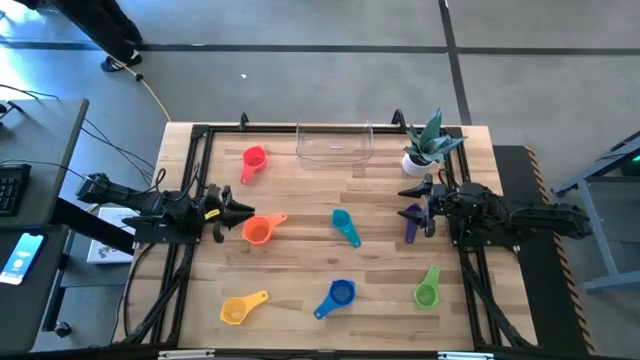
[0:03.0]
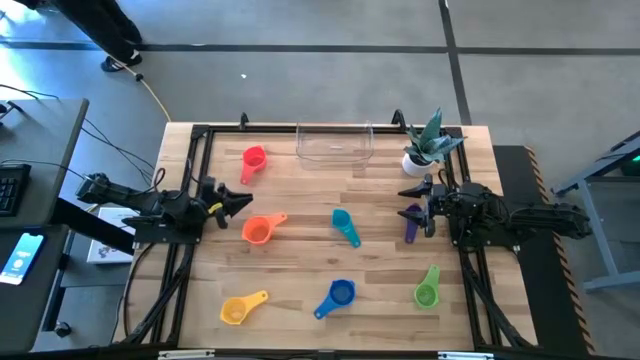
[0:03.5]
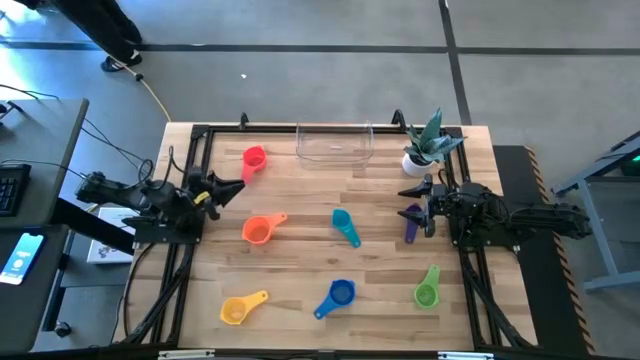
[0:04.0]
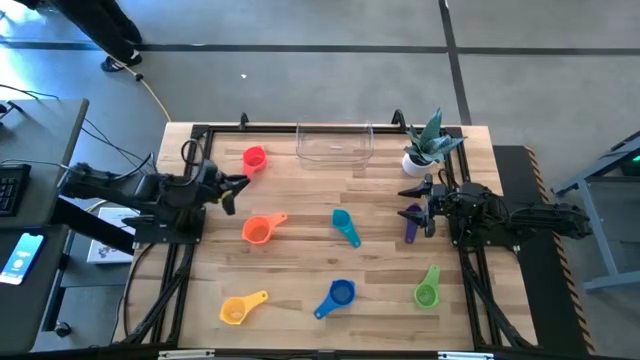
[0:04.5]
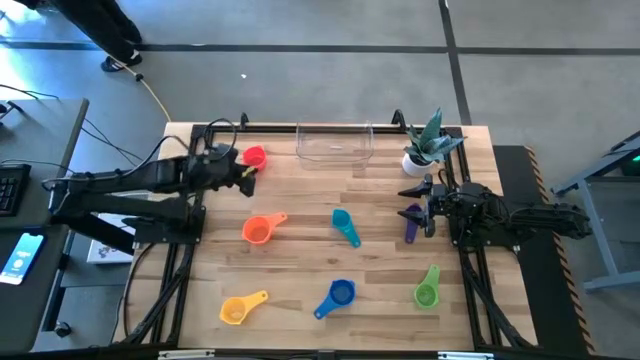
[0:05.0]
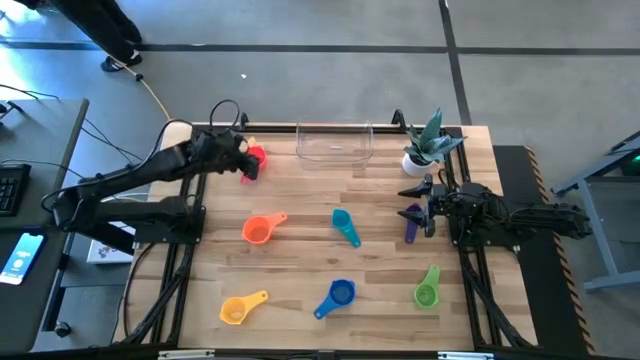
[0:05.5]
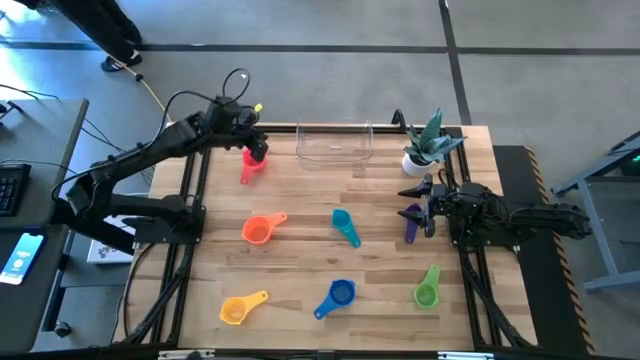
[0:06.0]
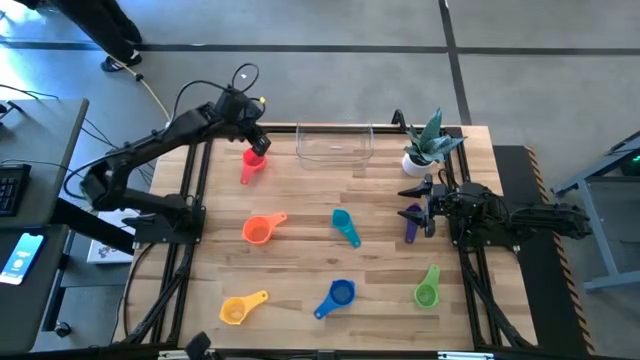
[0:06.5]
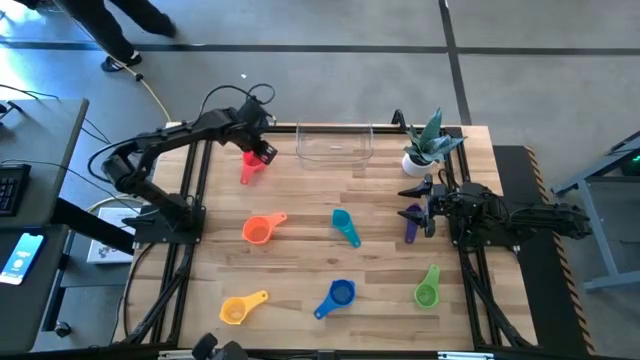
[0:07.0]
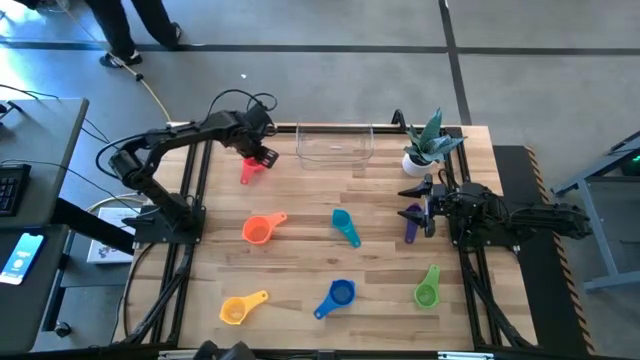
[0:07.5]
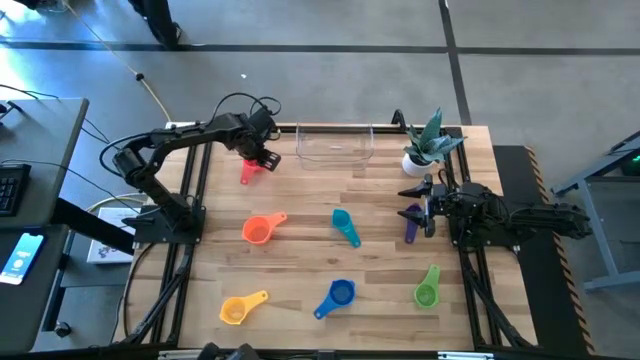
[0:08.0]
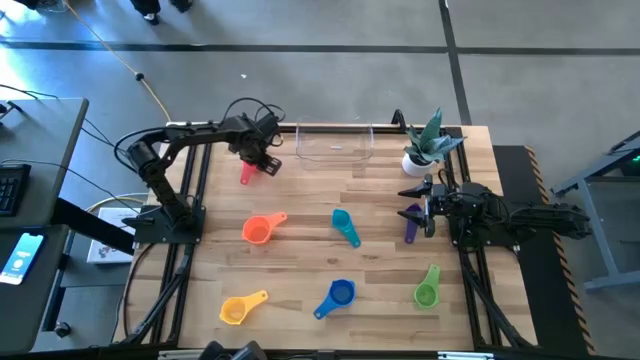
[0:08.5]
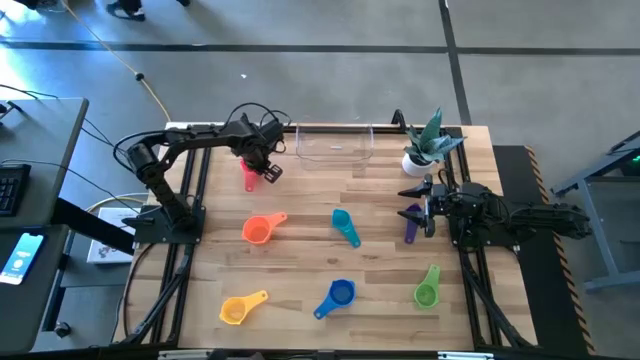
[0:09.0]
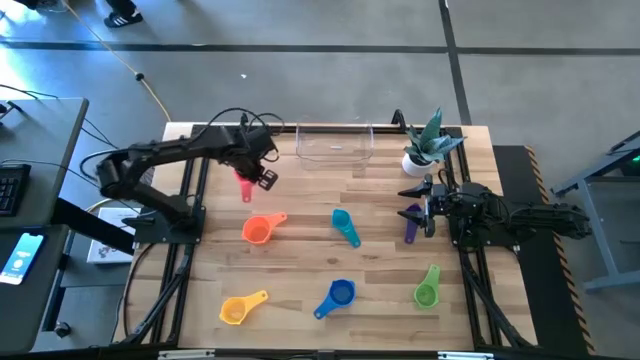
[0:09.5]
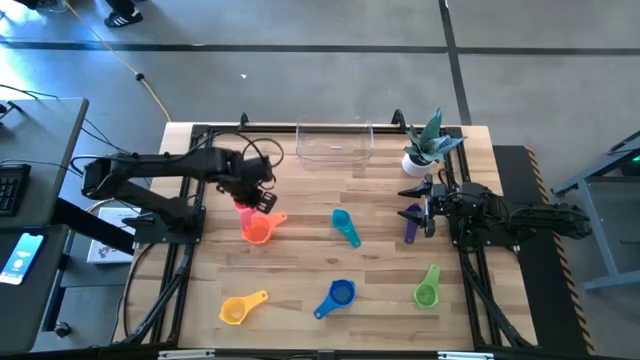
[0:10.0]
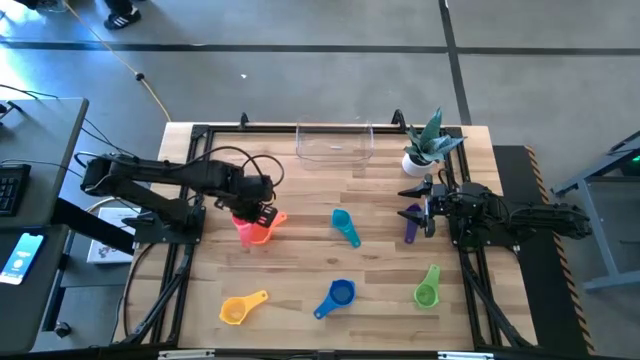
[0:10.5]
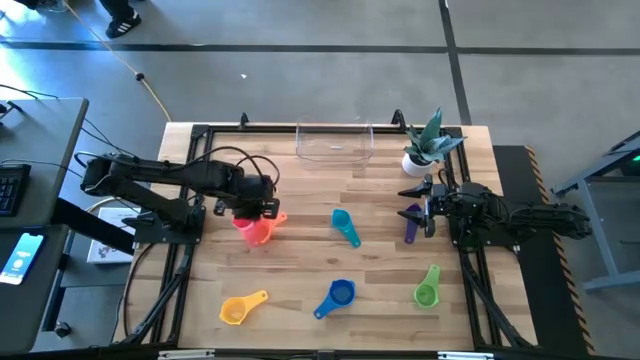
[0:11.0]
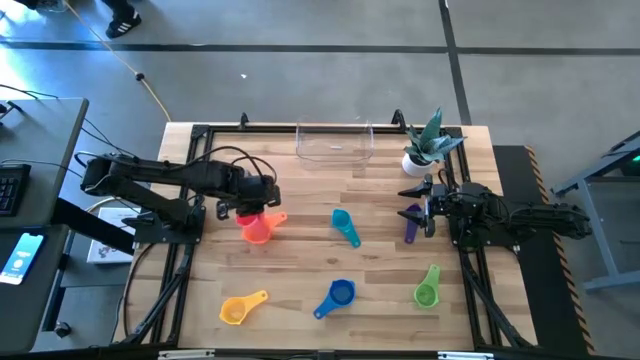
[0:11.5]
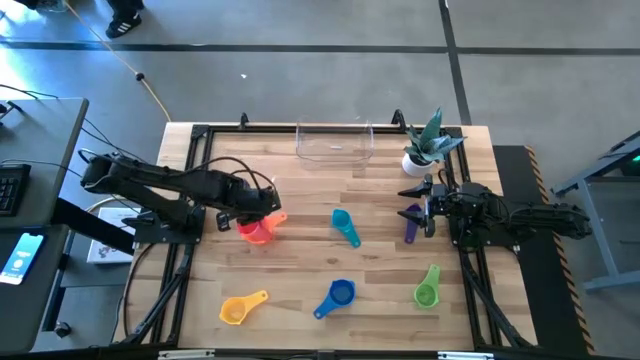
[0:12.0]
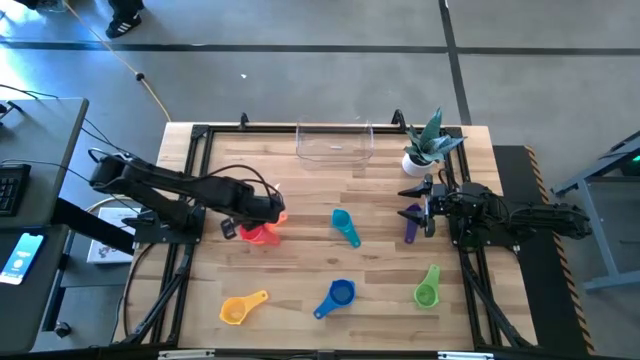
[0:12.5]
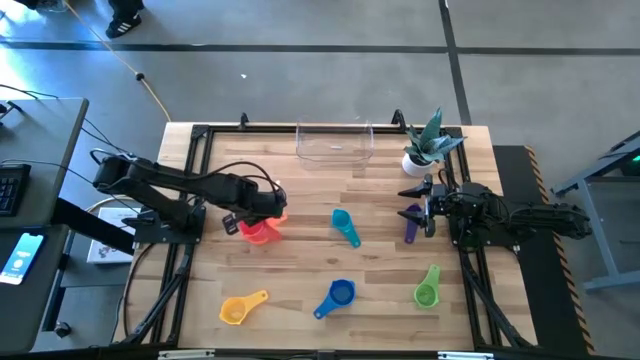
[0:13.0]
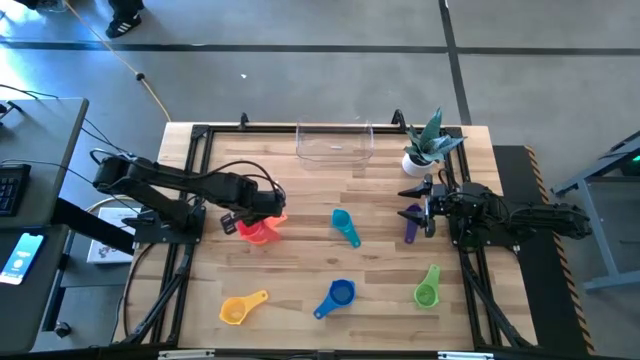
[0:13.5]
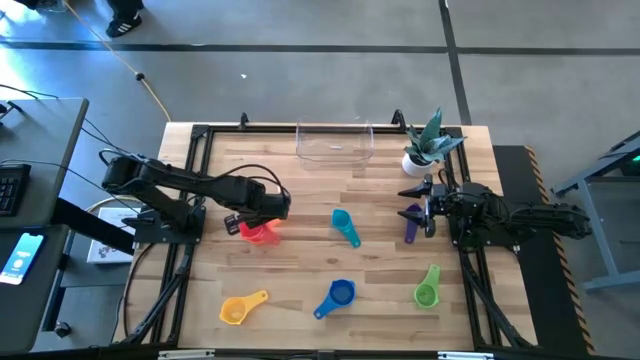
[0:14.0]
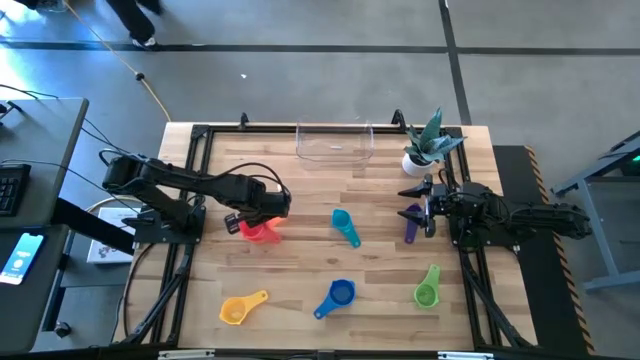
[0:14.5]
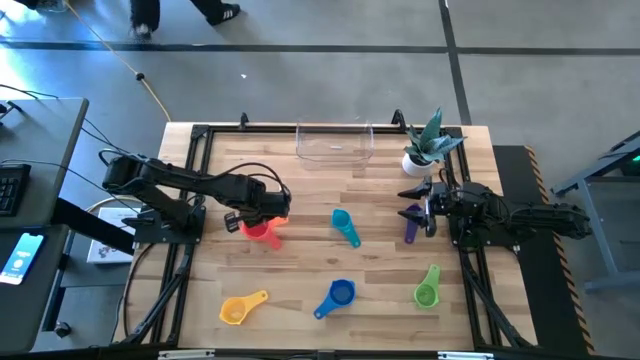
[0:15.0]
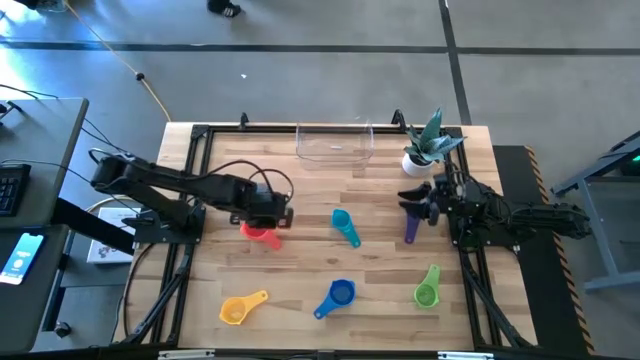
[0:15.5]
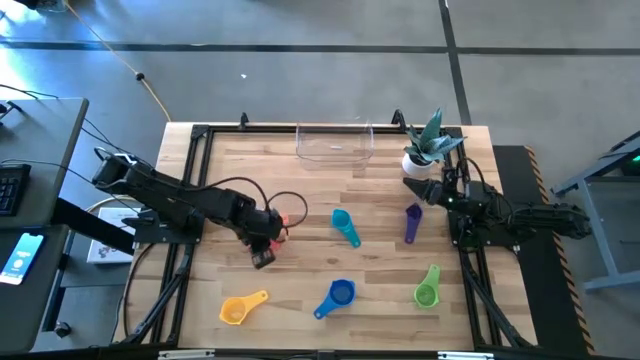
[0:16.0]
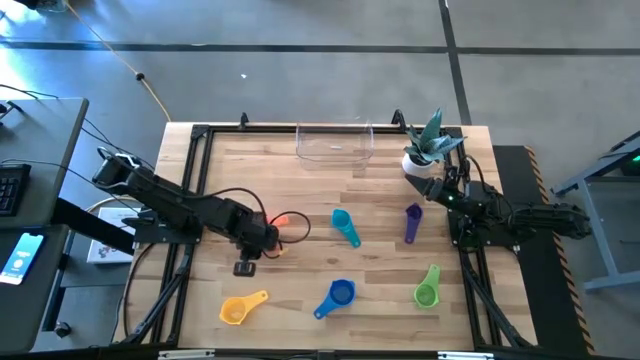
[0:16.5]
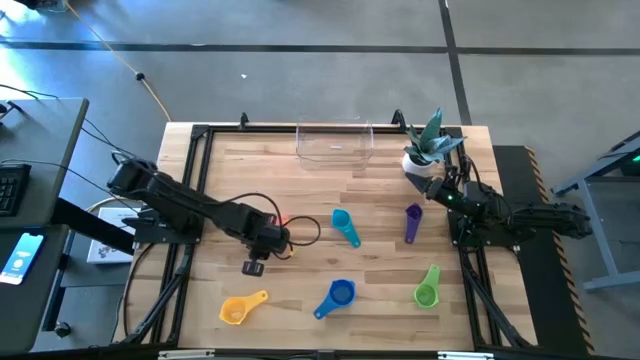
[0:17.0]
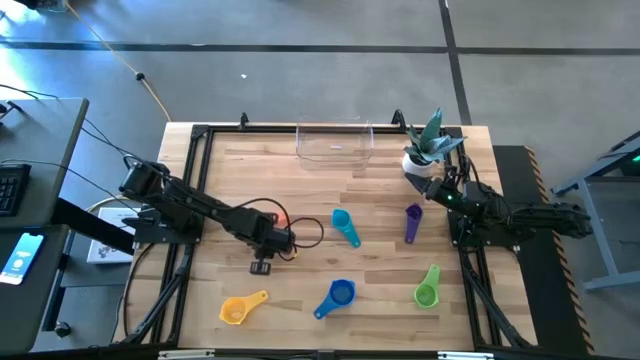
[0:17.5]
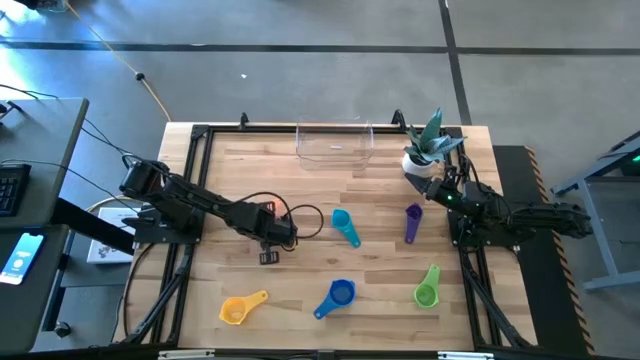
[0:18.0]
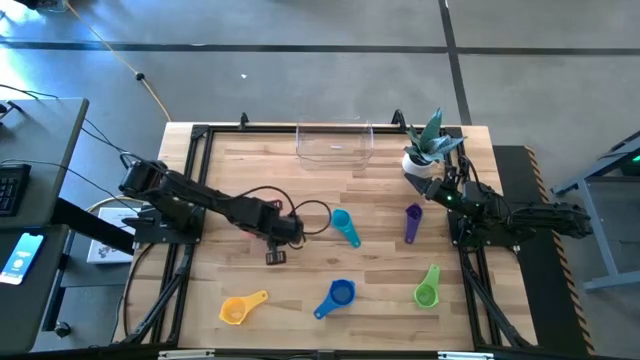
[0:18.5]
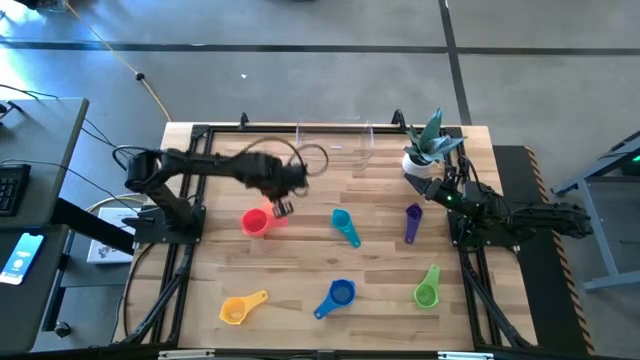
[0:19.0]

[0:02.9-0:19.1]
Task: Nest measuring cups in basket
Stack the red measuring cup on top of the orange measuring cup

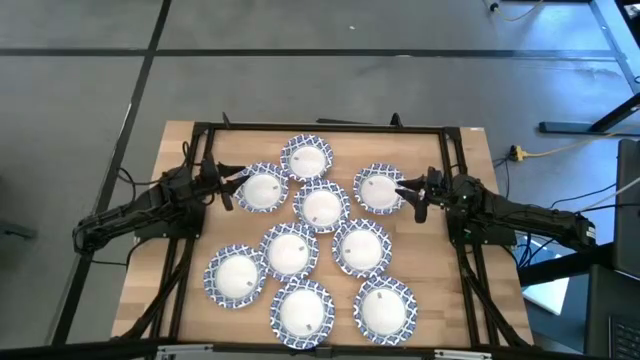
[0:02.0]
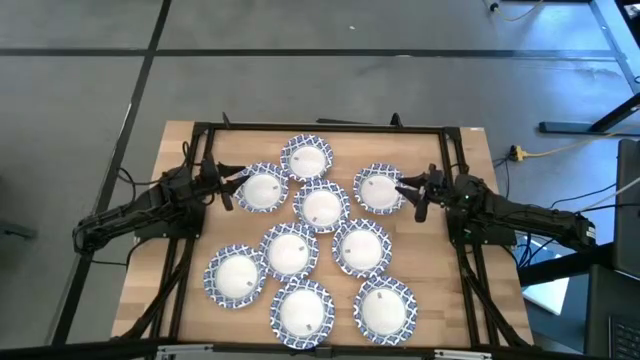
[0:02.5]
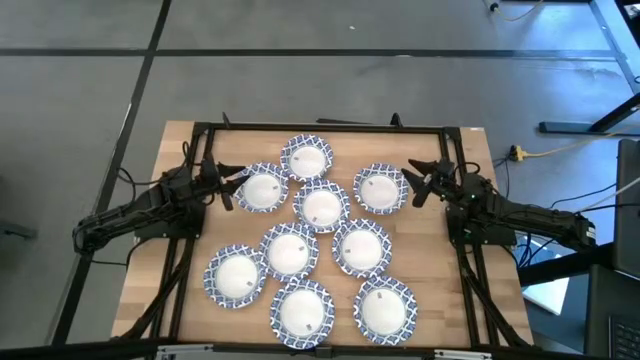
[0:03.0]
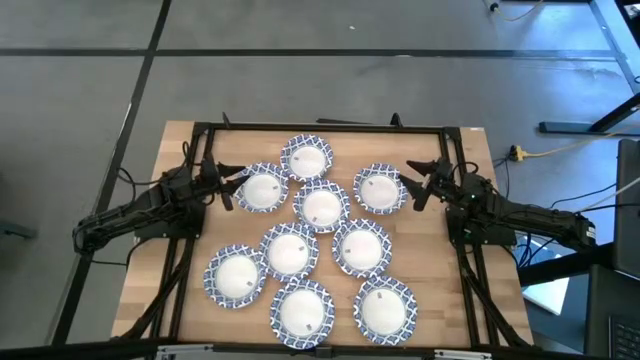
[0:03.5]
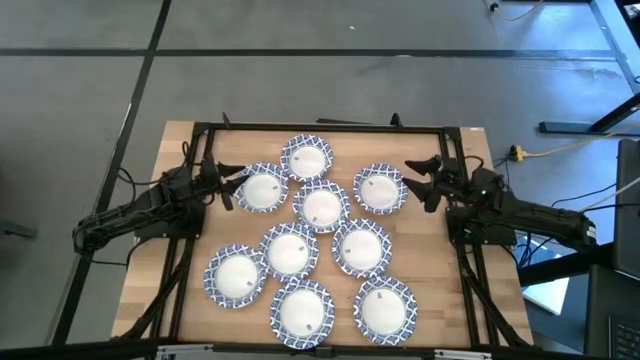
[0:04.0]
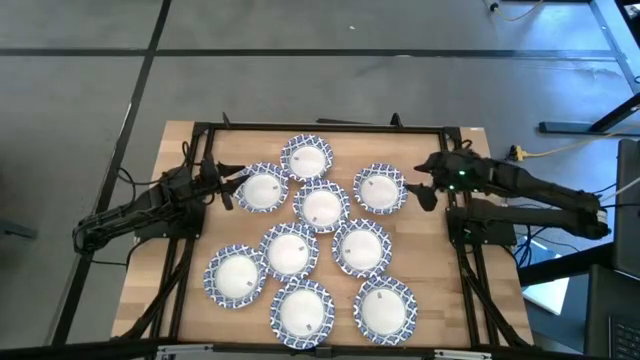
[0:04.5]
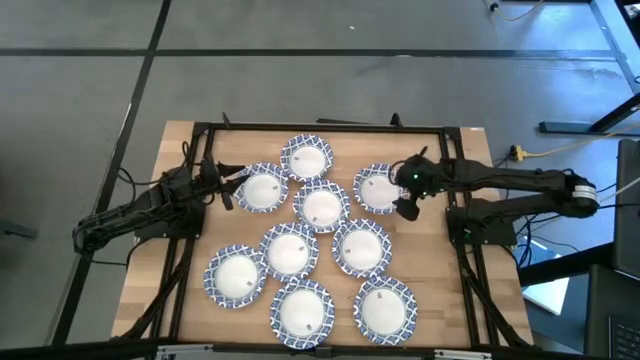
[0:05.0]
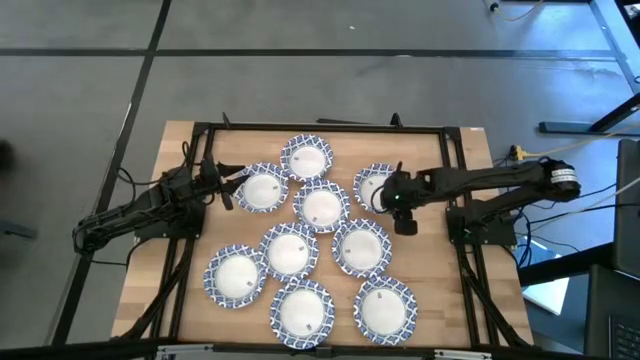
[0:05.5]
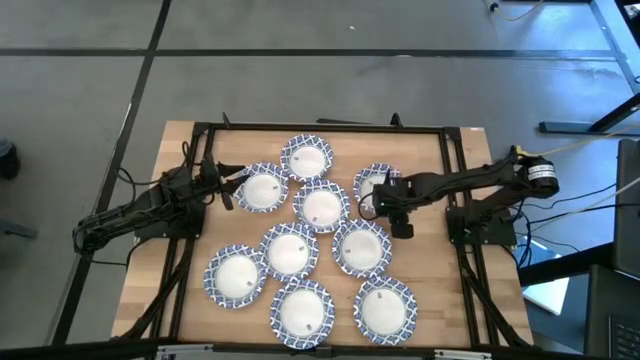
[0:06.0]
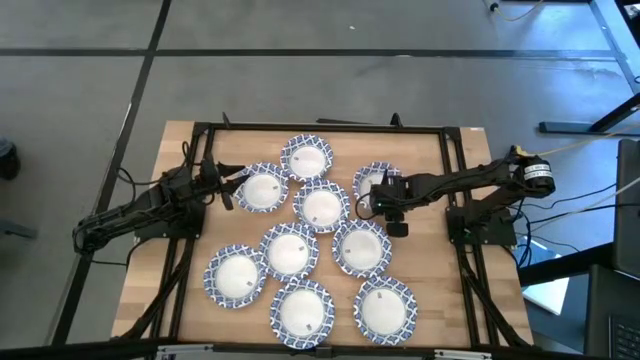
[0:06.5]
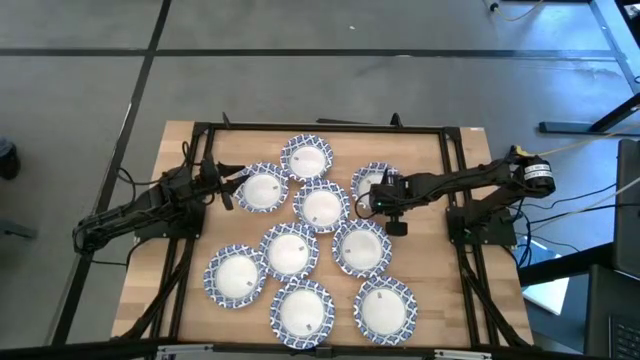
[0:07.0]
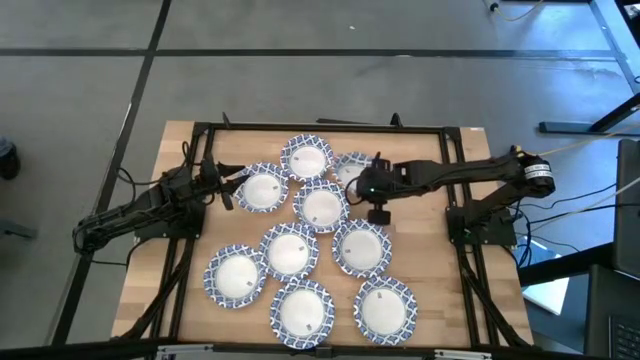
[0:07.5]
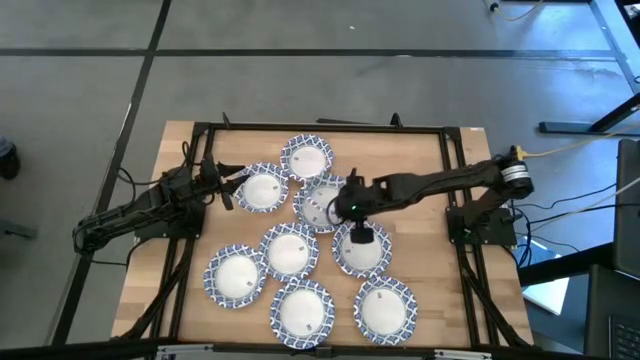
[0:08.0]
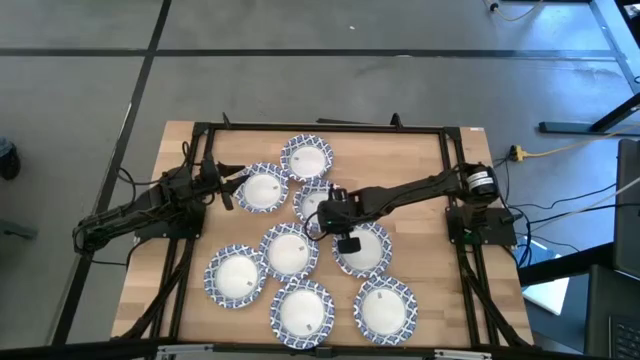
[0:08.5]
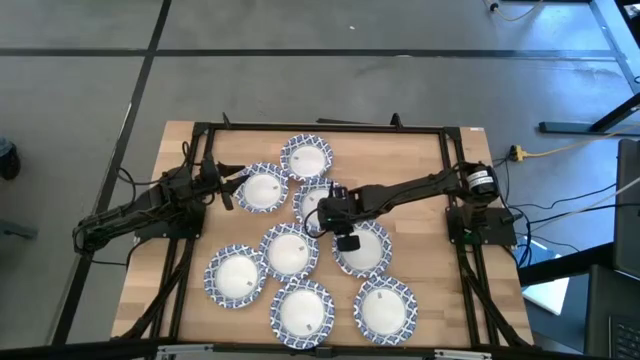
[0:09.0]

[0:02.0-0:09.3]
Task: Nest bowls inside each other
Stack the blue patterned bowl on the other blue patterned bowl
